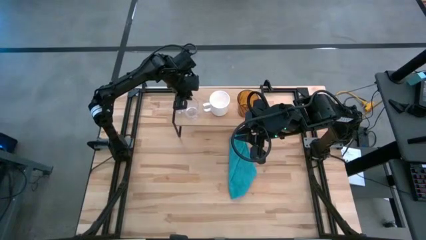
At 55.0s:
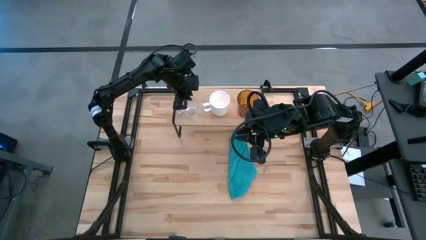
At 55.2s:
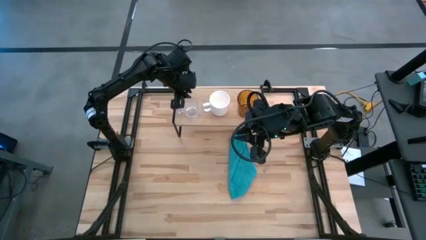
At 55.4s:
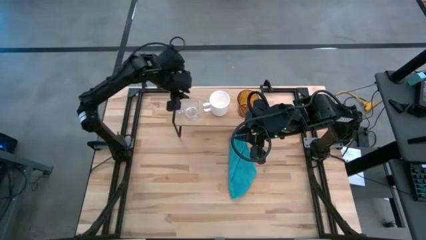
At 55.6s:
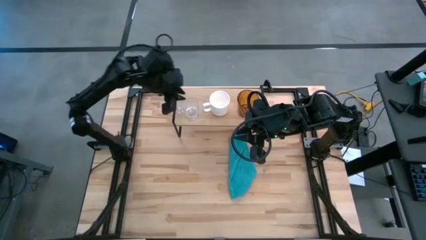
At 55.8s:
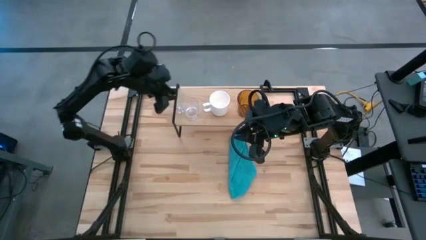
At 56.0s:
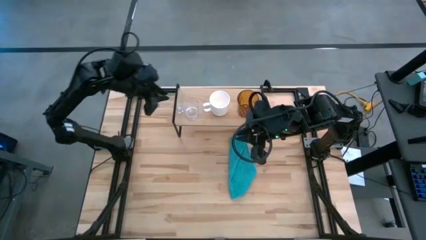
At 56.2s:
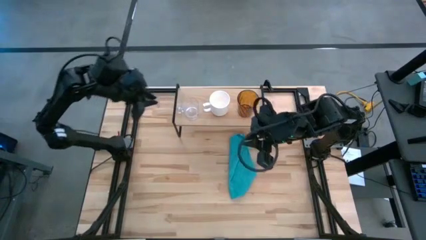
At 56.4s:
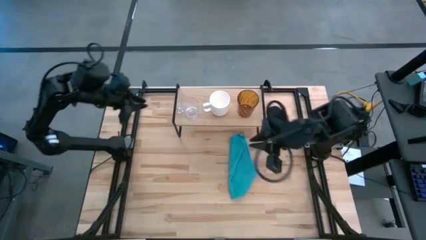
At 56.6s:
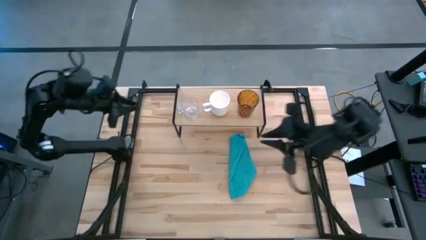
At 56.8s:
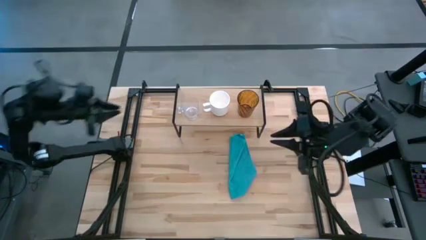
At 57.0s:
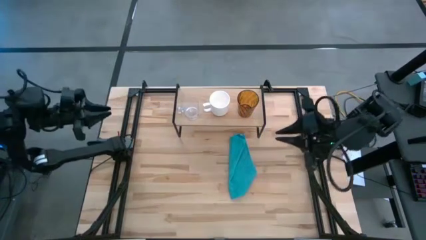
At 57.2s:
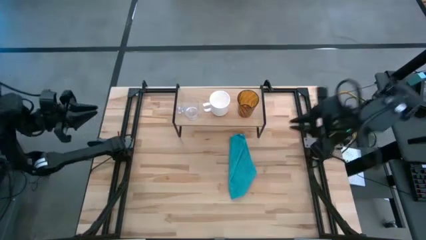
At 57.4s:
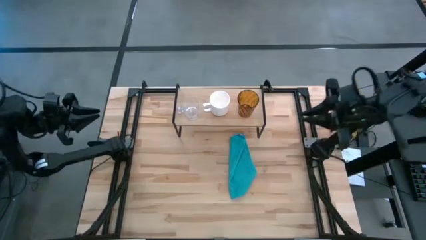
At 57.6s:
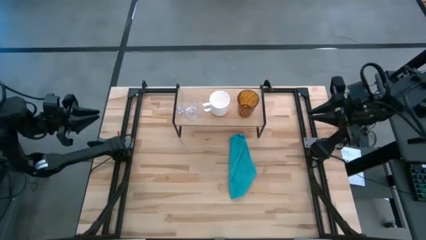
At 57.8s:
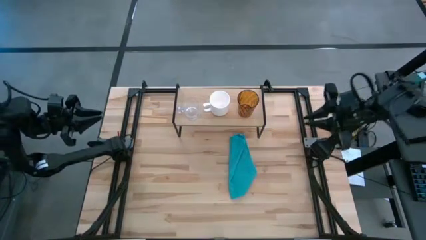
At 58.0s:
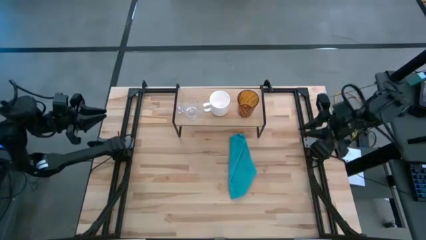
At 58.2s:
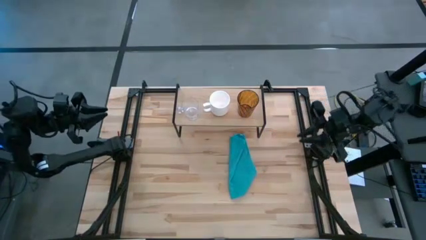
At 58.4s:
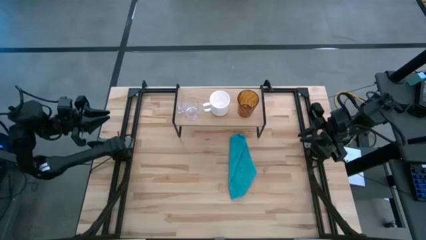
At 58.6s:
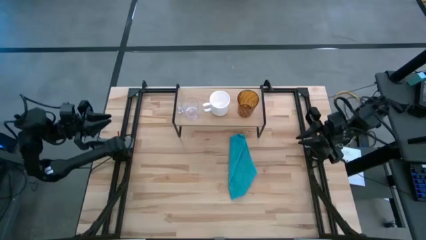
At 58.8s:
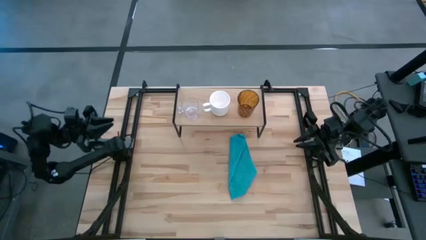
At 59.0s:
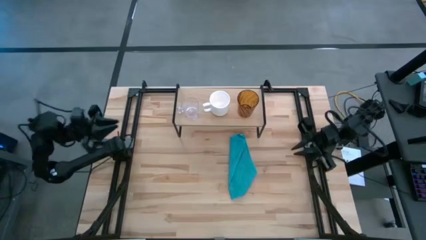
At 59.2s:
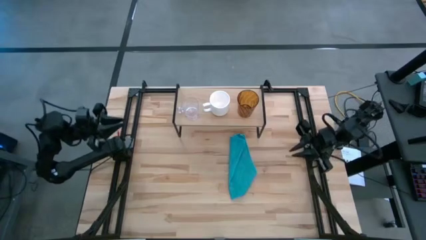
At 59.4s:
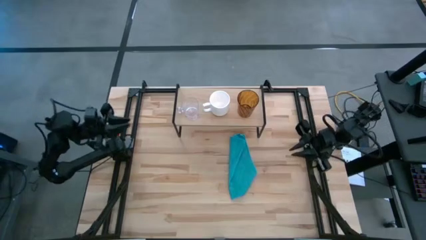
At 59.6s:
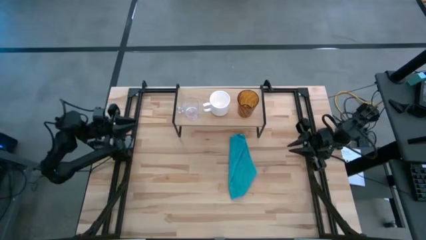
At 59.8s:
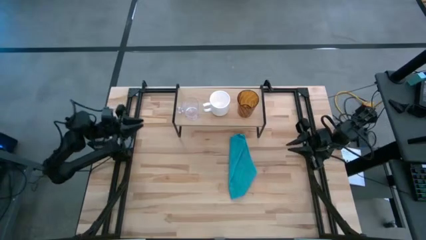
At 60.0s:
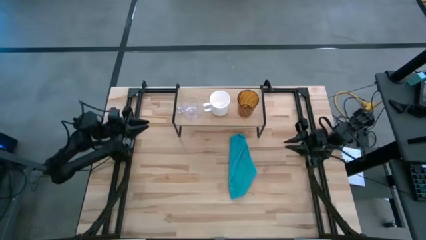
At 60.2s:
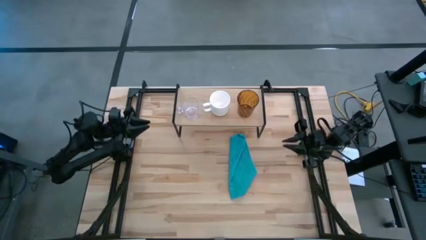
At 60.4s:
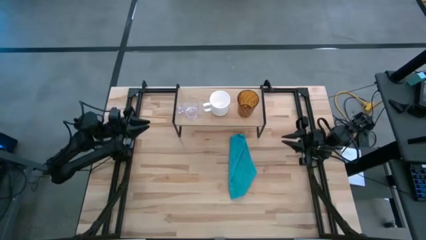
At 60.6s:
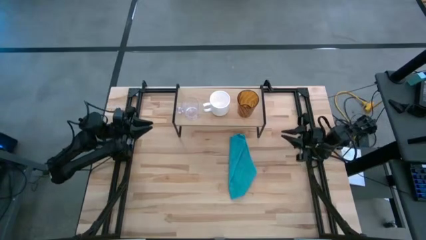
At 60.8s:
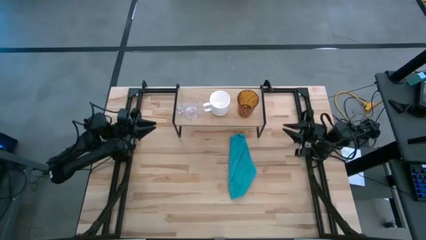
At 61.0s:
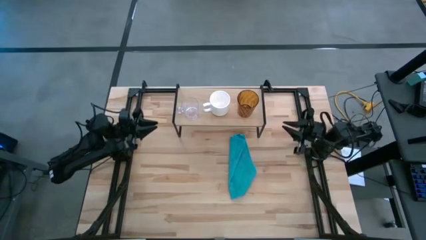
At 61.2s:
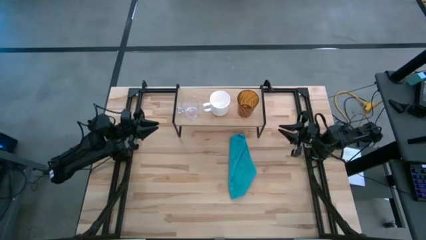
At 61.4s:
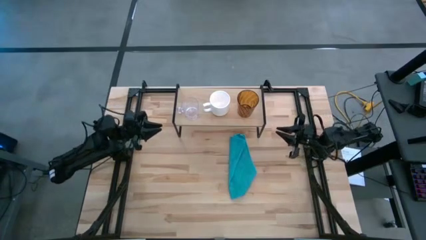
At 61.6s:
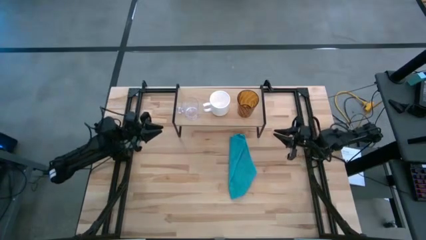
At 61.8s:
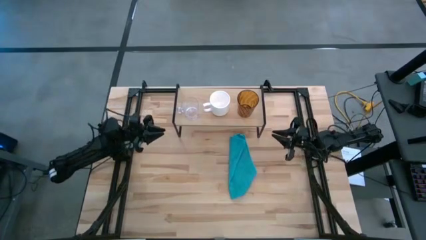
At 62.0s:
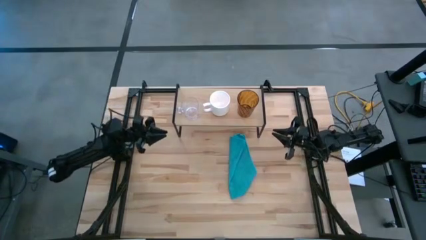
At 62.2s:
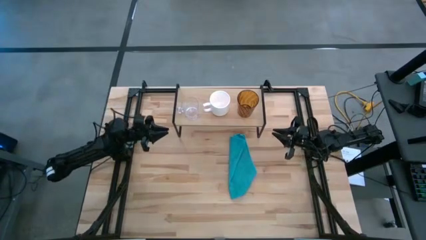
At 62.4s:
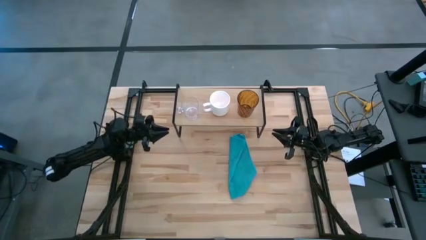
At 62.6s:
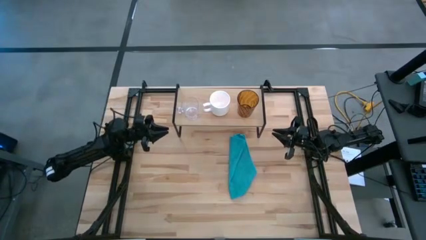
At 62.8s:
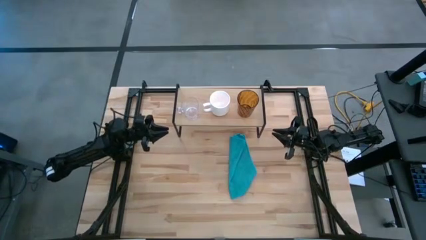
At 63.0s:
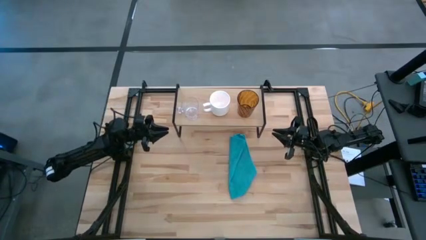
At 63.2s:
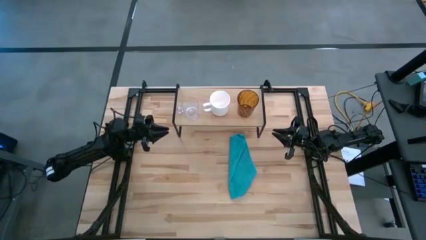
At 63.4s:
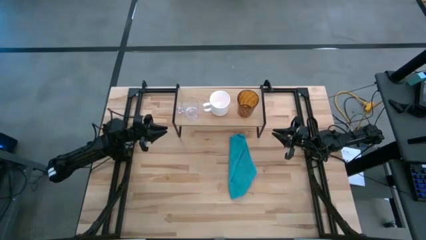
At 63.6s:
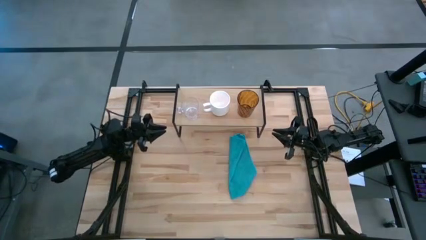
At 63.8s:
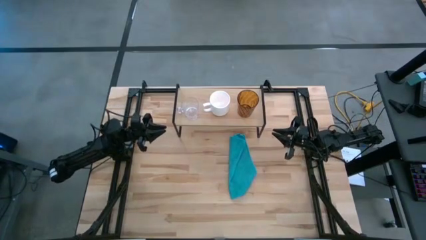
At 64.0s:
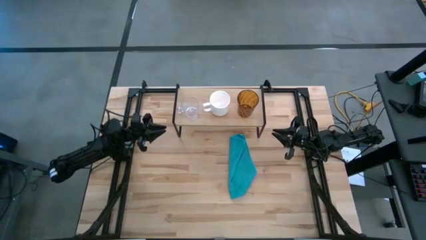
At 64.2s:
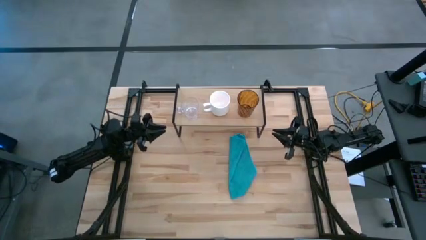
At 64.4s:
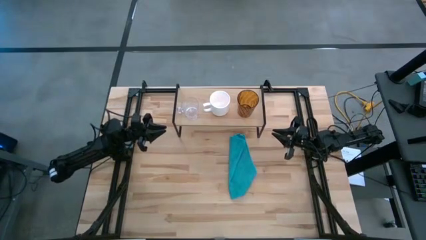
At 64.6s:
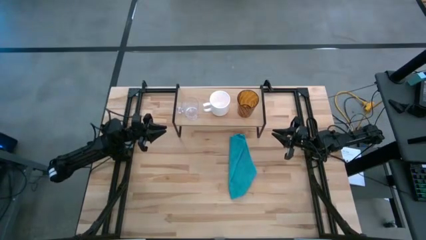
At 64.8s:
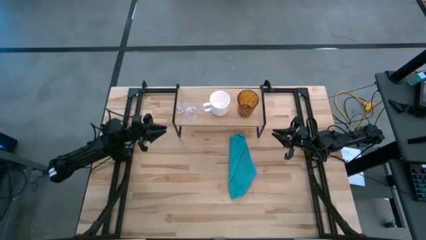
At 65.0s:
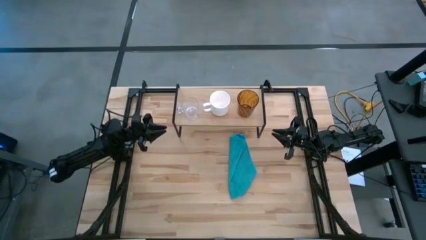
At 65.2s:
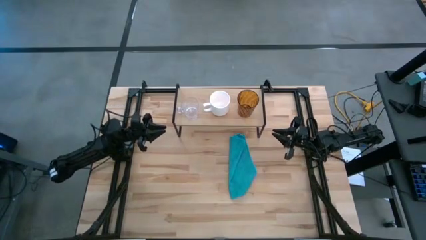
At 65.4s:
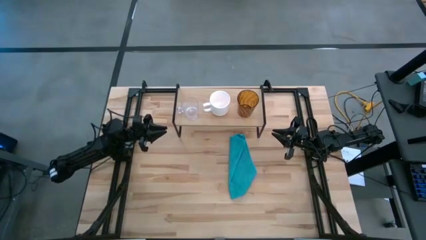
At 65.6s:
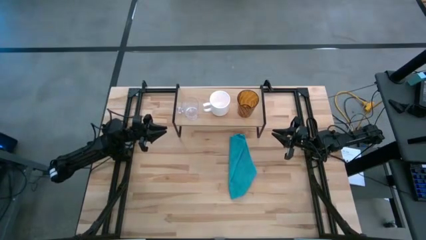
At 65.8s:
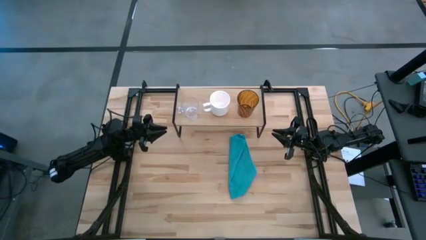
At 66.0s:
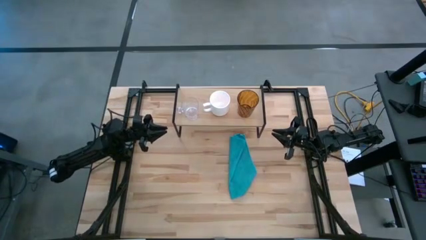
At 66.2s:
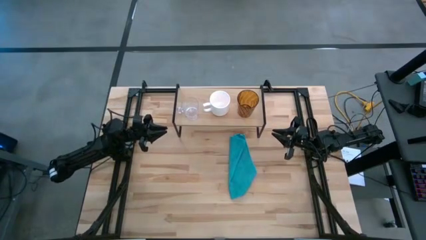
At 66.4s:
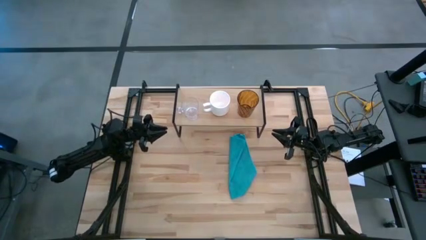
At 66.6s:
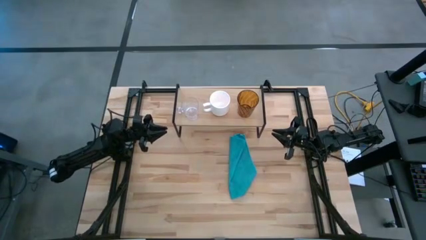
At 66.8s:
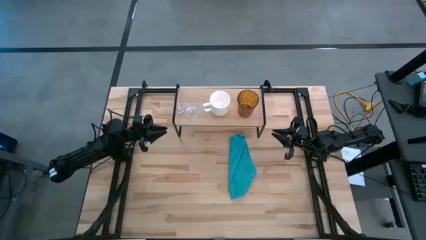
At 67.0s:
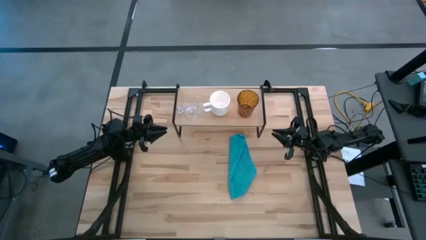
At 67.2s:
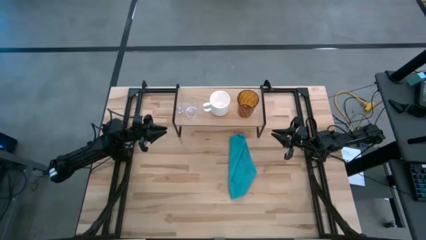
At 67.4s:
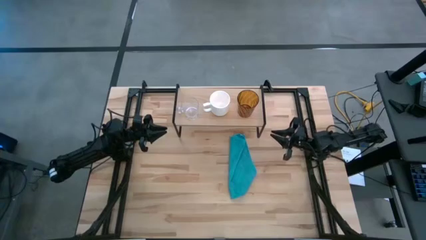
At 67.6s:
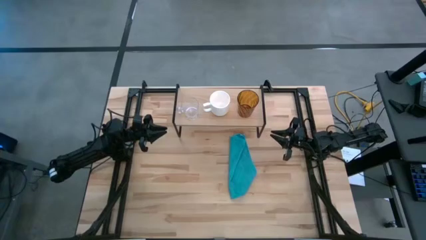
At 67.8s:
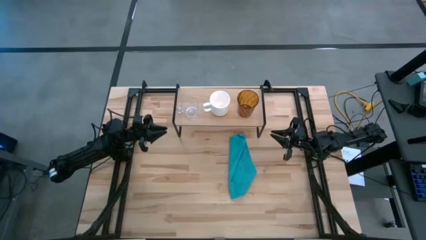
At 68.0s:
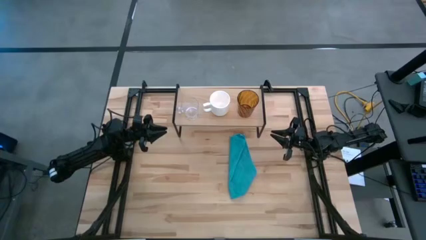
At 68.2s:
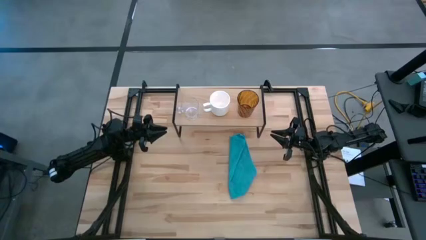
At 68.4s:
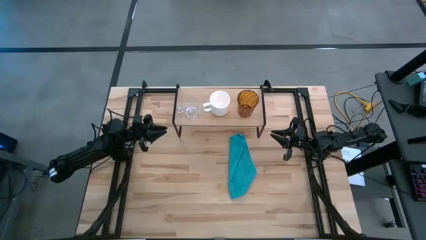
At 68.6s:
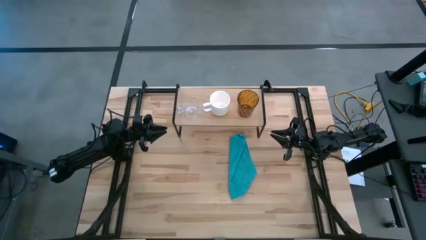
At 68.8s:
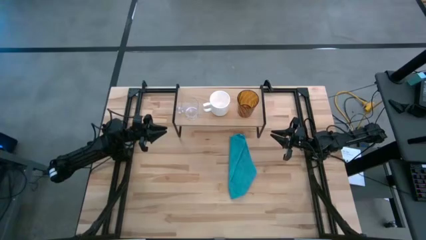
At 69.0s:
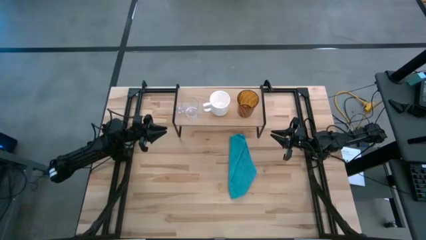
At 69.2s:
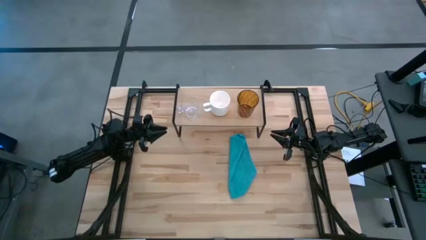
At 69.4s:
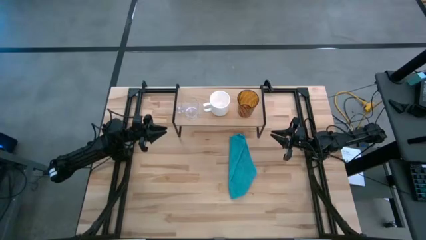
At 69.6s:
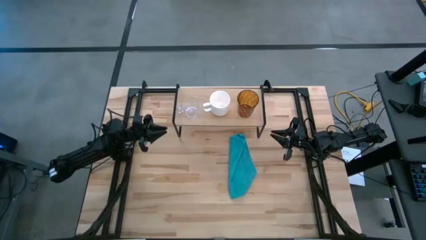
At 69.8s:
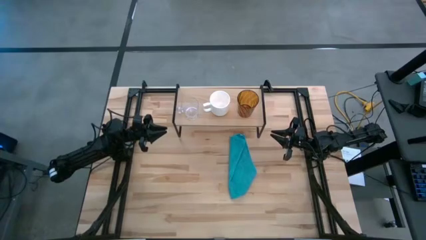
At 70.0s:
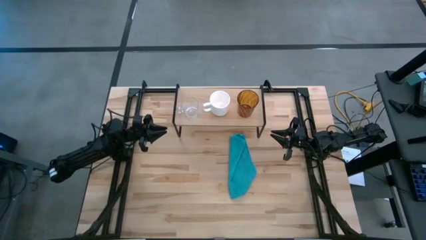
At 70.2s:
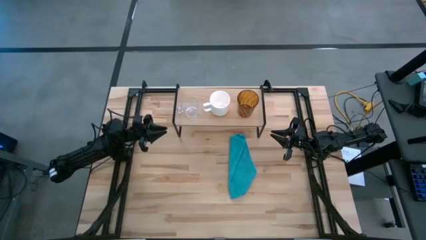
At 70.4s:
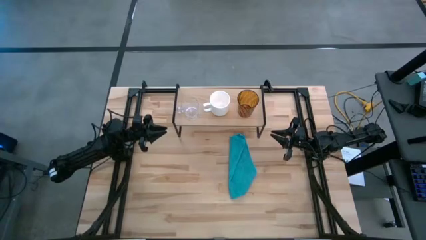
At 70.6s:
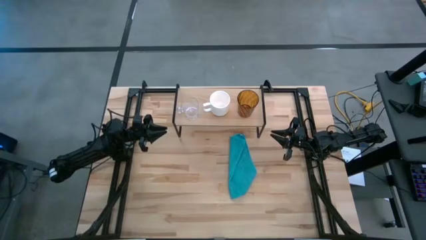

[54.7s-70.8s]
Task: Stack small to large cups/mugs on shelf
Return to Home Position

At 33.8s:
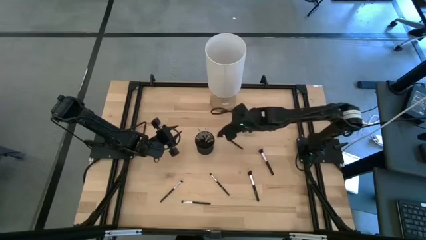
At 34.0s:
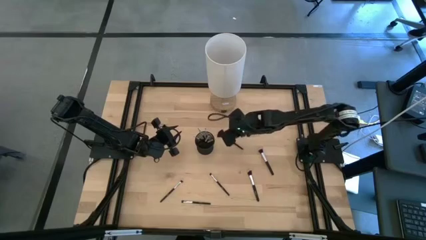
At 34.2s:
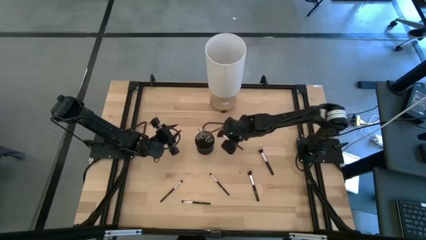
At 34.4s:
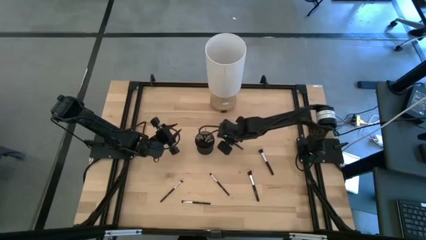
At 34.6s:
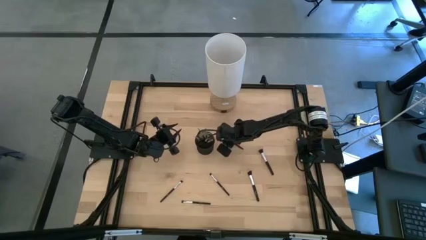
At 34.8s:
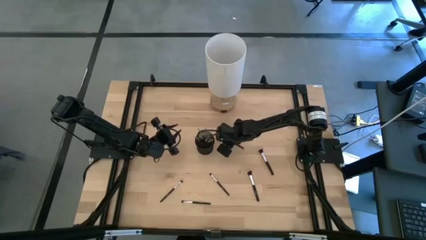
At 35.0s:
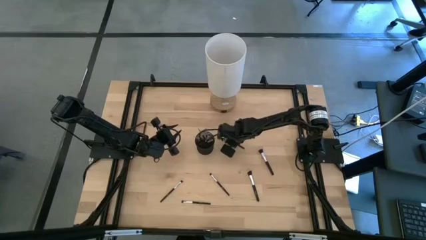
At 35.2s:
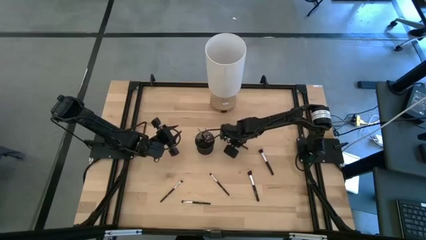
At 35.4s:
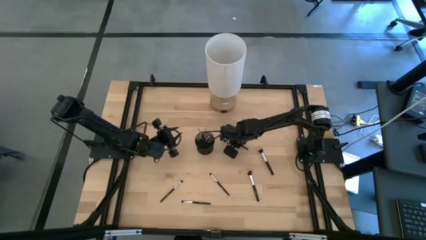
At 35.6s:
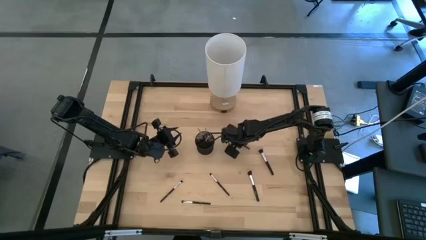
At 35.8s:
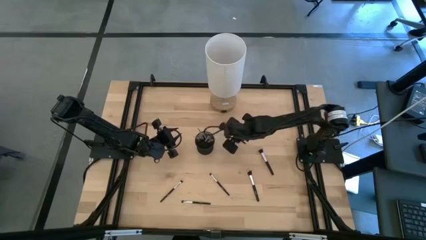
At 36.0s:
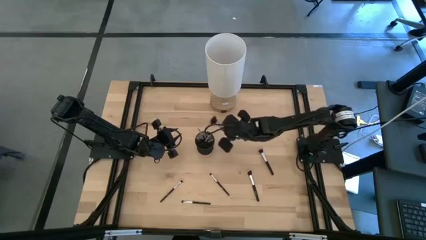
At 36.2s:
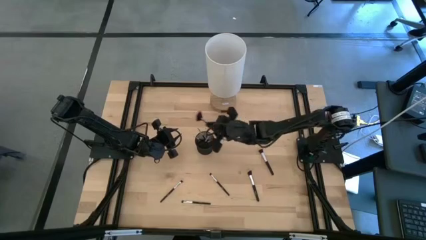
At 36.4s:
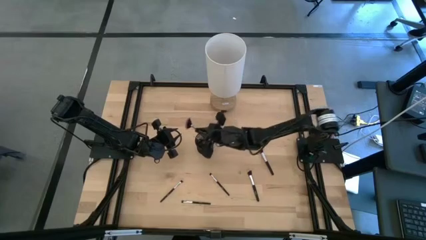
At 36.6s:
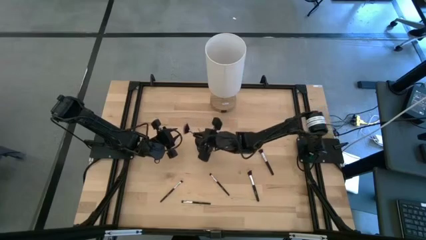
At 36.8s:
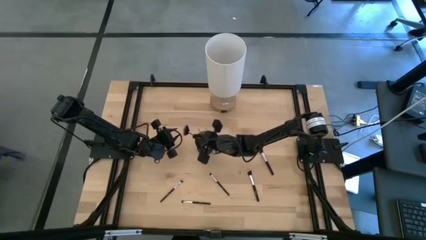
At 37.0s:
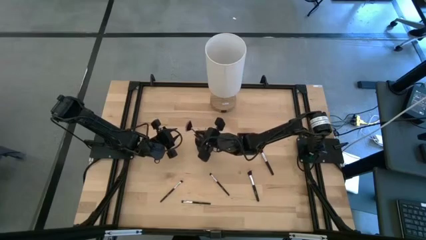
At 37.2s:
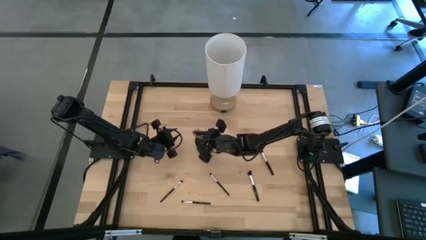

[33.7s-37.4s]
Task: Put items in baskets/containers
Put the highlighter brush into the holder
